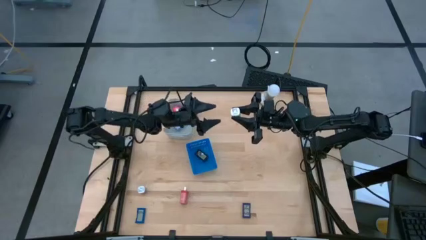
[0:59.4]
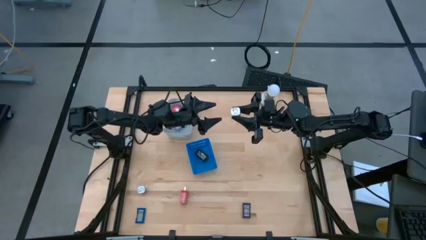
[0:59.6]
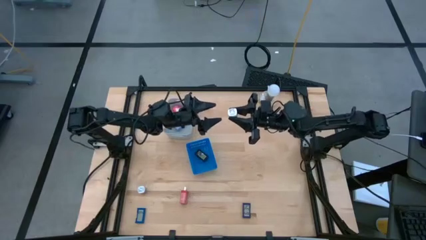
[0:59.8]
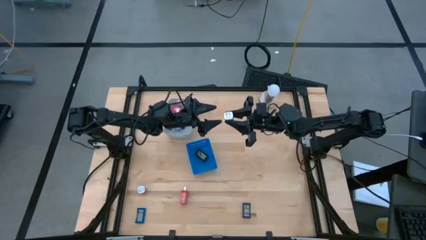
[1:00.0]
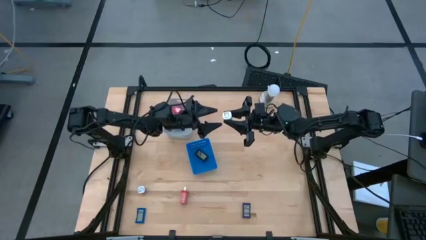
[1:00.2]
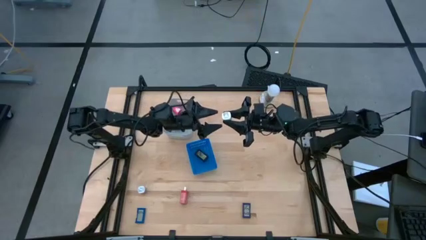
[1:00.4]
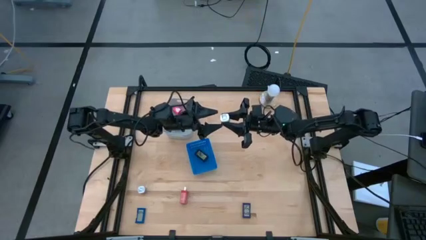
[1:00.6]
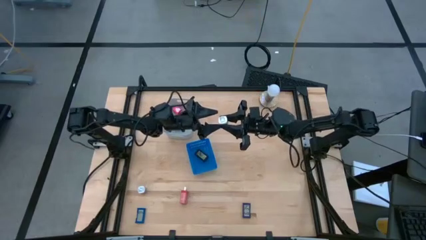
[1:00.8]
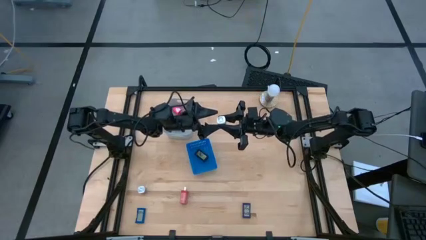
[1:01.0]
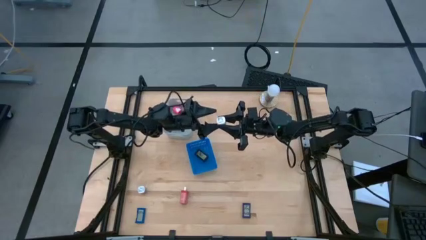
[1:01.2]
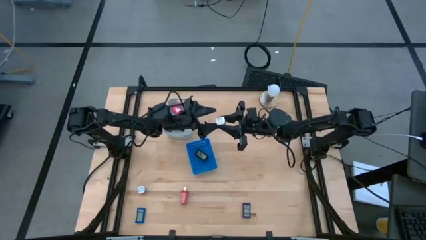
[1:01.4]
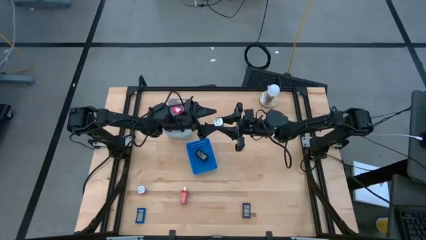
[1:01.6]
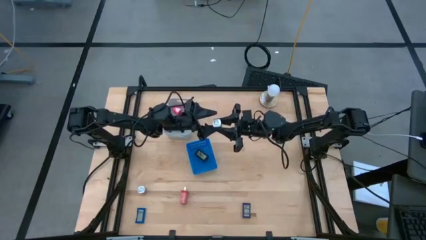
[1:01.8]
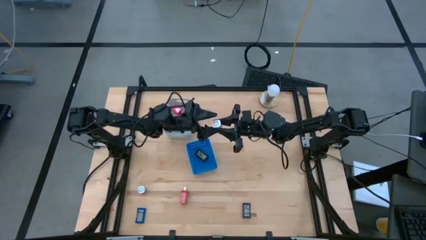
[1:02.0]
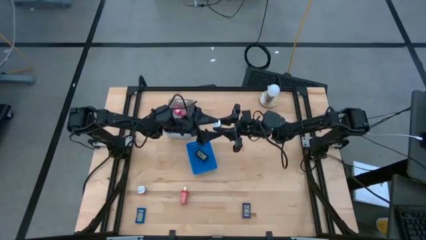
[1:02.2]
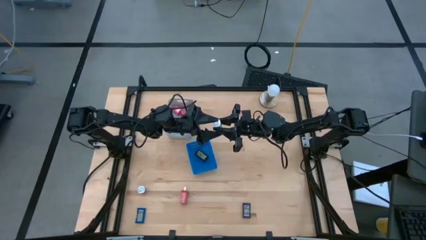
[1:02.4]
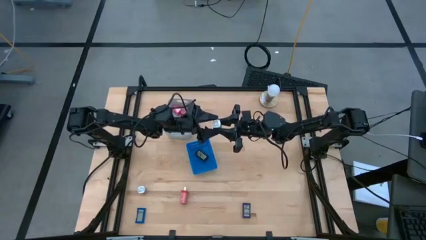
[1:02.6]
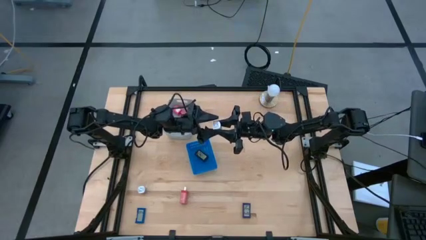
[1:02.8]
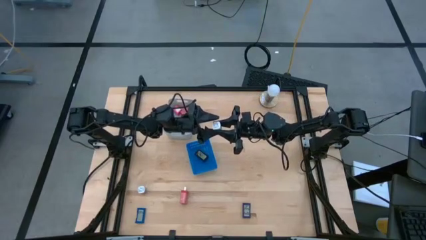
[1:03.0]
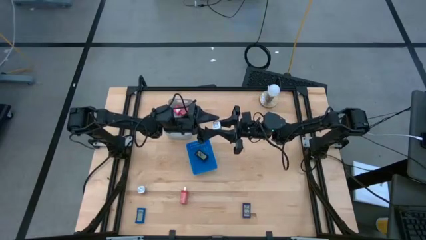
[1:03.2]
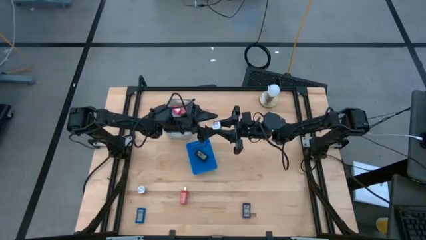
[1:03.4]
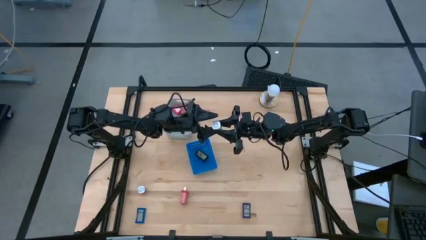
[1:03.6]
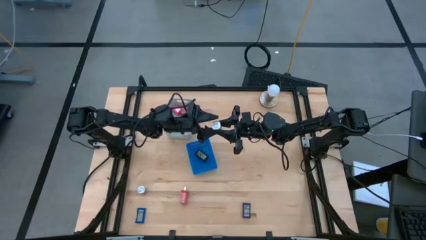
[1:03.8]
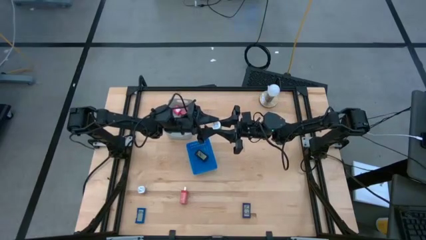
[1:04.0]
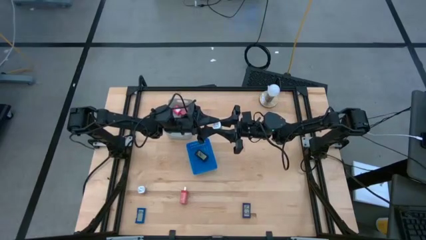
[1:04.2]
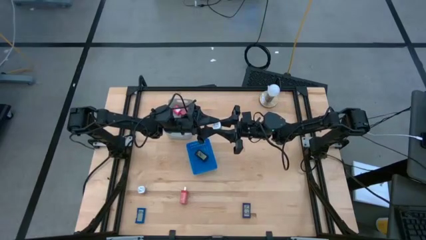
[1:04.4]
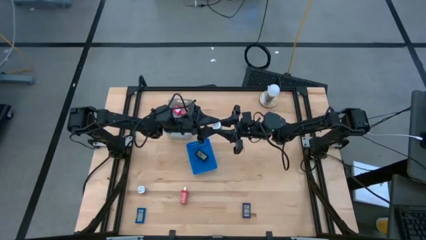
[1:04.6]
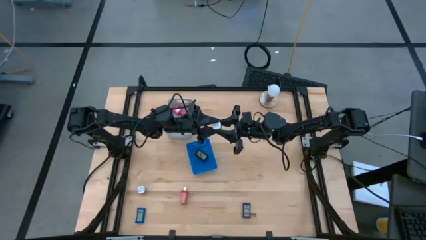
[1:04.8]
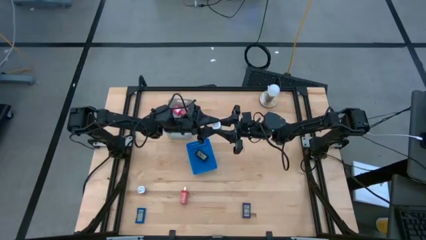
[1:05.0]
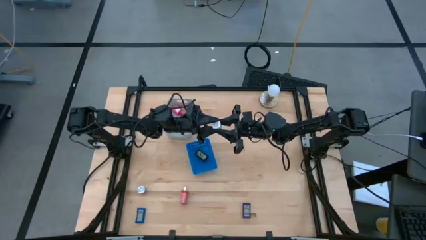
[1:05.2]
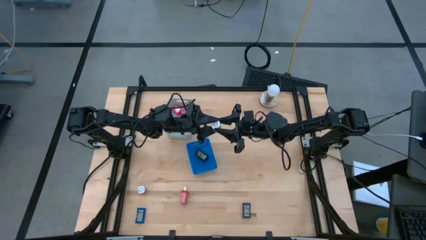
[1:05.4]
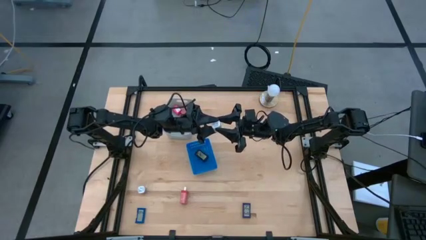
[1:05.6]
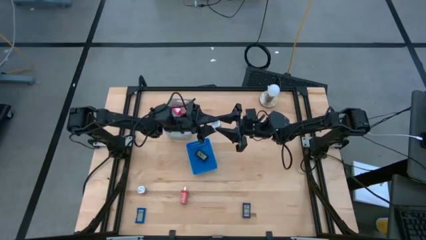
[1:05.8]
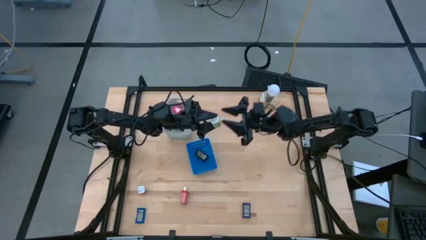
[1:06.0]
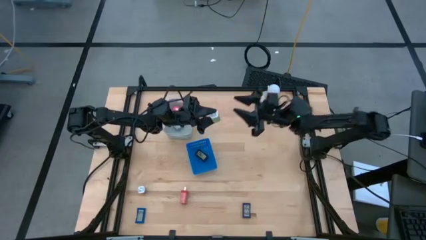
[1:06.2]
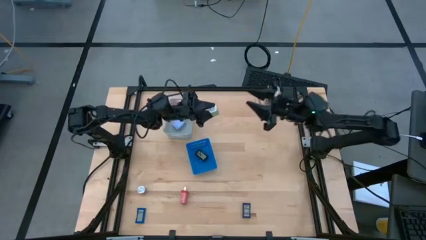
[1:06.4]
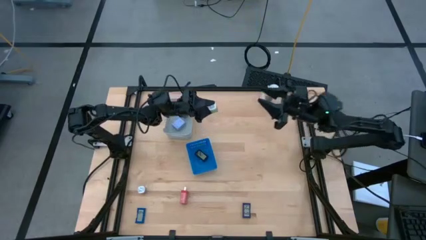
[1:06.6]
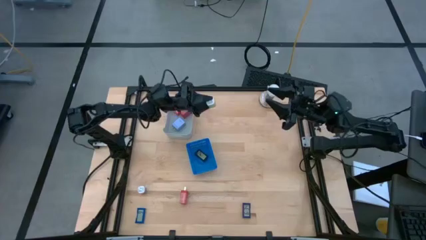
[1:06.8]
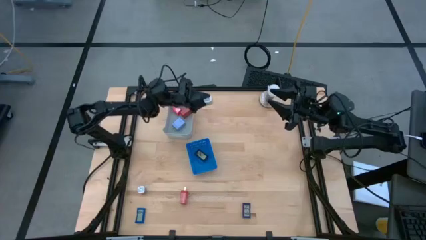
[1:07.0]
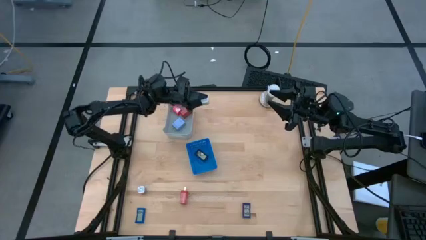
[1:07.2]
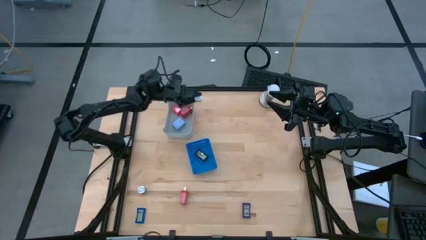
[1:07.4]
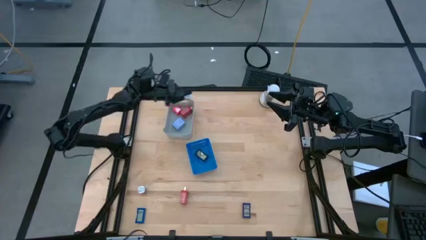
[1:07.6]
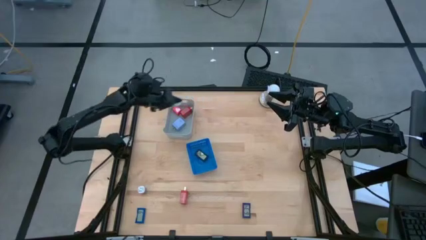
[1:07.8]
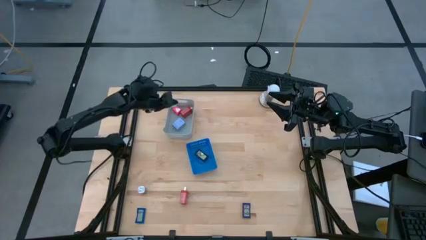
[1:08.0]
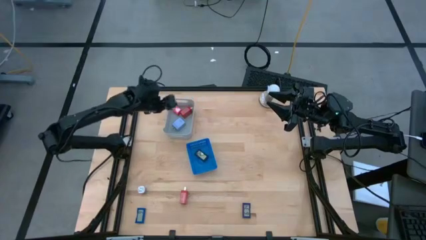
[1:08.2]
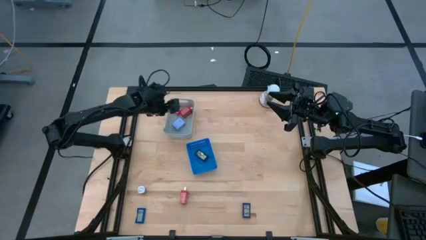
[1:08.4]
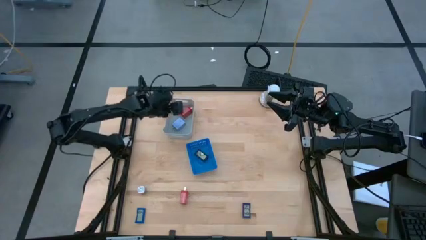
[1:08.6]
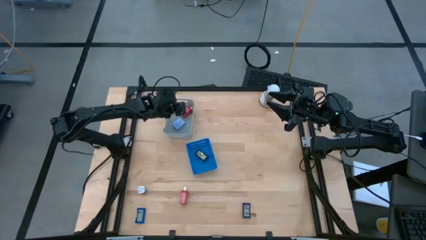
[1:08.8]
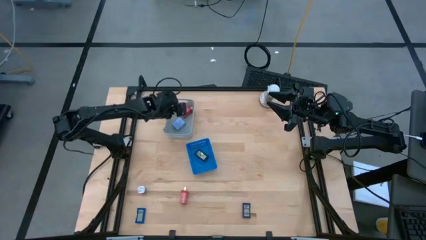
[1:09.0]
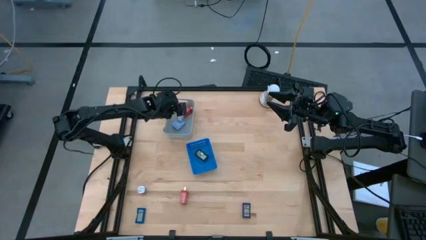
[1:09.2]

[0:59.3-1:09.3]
Task: Pick & Place Office items
Put the green charger adapter into the gray bin

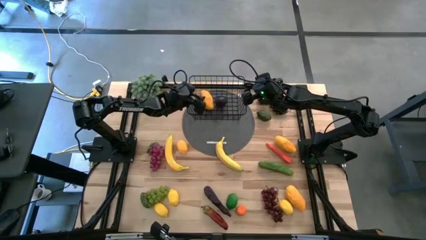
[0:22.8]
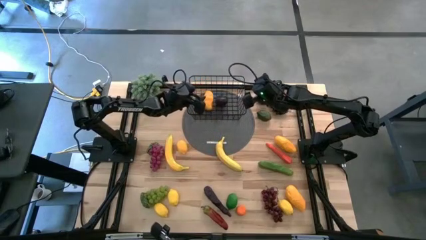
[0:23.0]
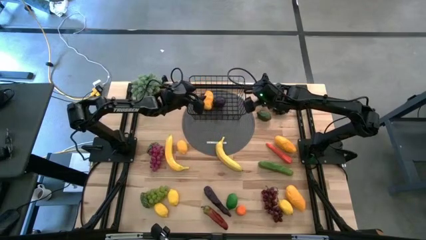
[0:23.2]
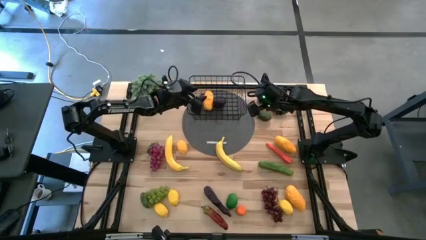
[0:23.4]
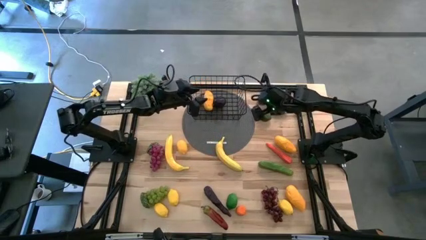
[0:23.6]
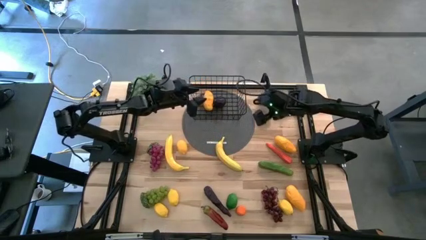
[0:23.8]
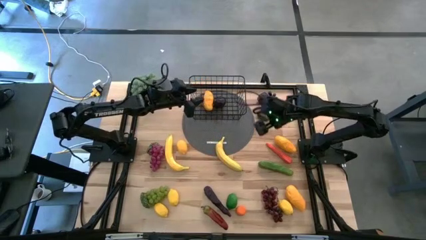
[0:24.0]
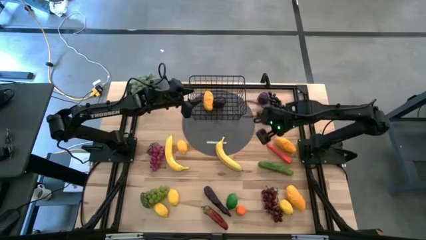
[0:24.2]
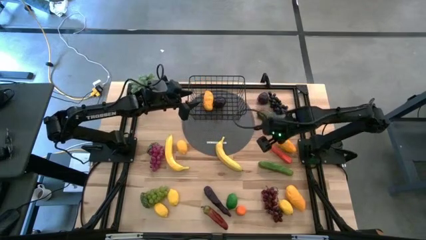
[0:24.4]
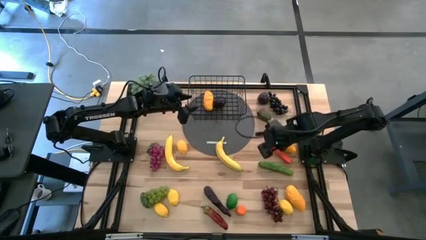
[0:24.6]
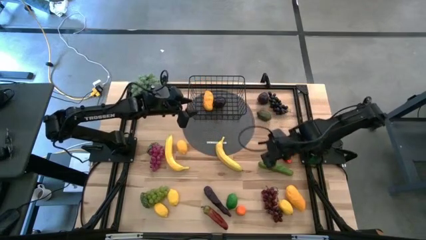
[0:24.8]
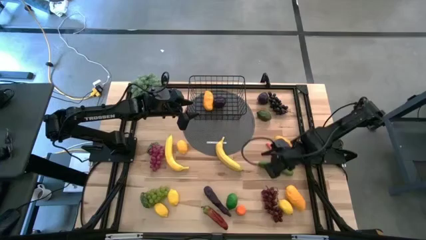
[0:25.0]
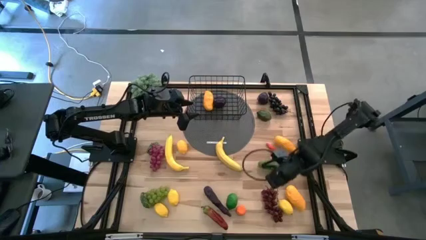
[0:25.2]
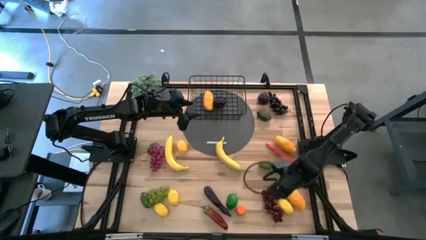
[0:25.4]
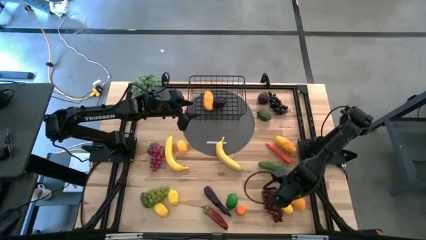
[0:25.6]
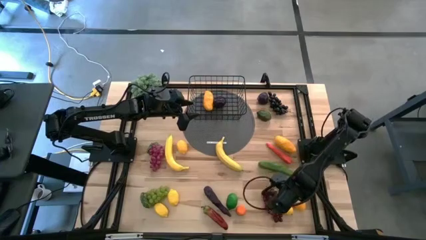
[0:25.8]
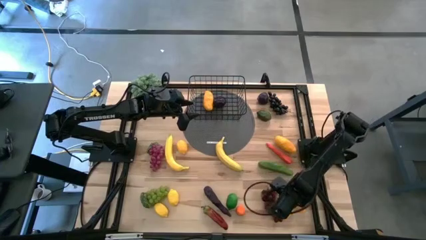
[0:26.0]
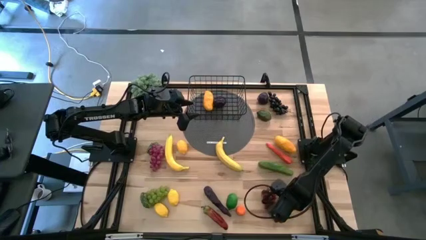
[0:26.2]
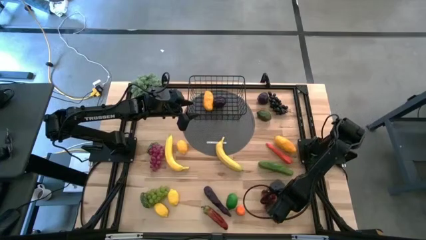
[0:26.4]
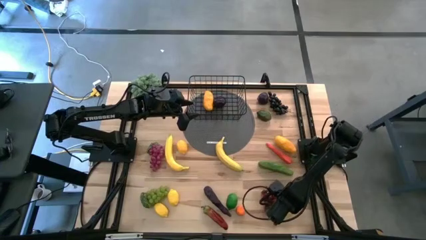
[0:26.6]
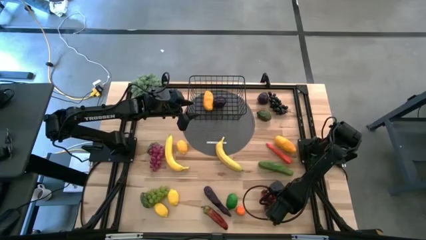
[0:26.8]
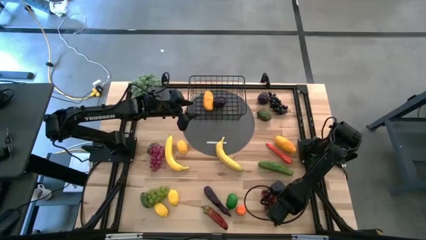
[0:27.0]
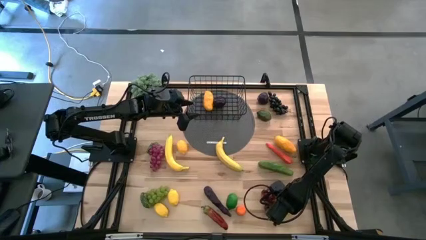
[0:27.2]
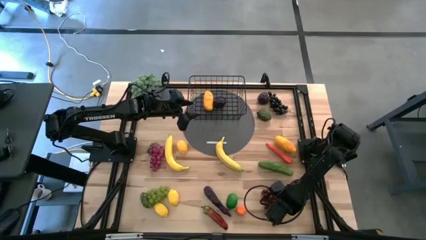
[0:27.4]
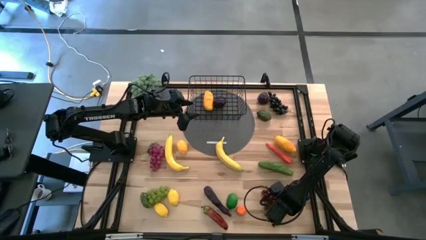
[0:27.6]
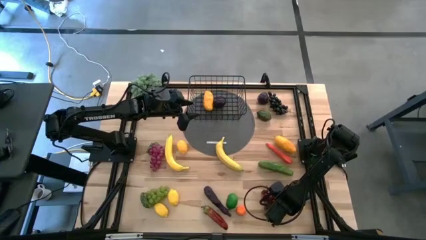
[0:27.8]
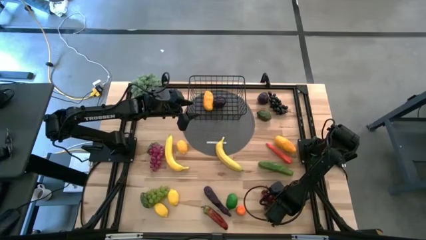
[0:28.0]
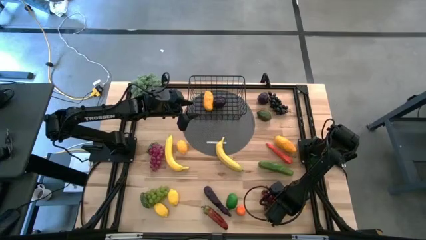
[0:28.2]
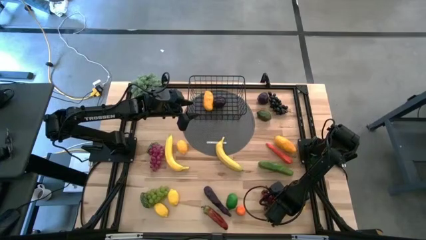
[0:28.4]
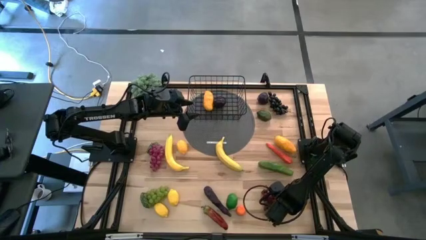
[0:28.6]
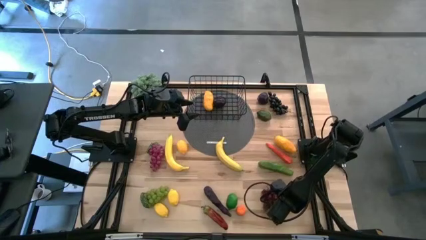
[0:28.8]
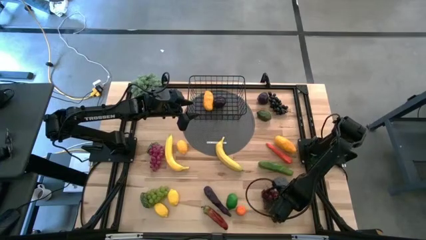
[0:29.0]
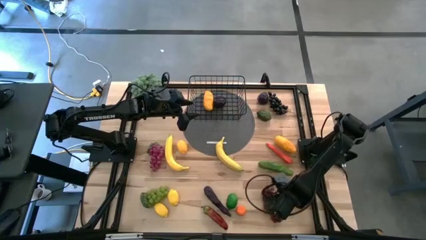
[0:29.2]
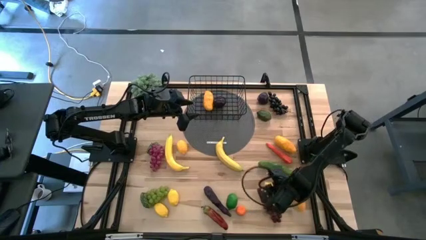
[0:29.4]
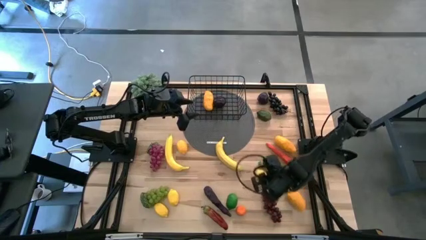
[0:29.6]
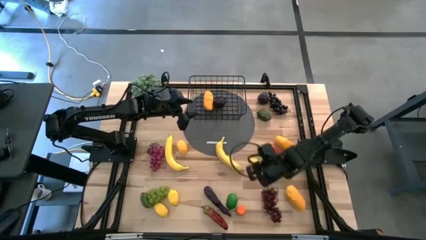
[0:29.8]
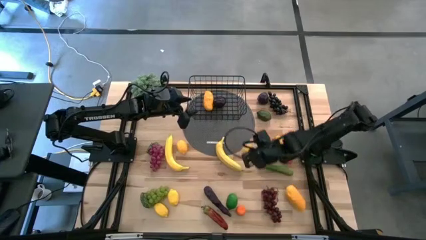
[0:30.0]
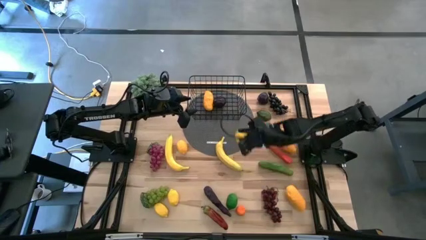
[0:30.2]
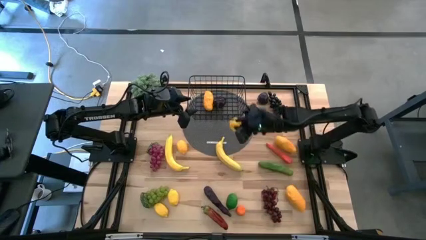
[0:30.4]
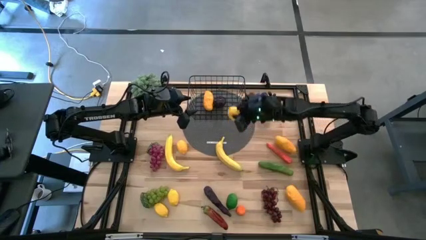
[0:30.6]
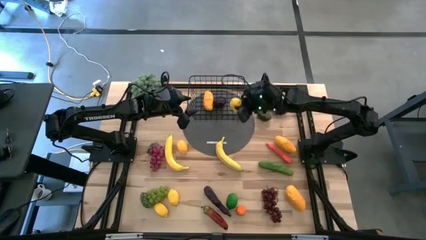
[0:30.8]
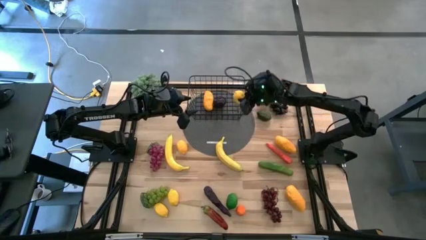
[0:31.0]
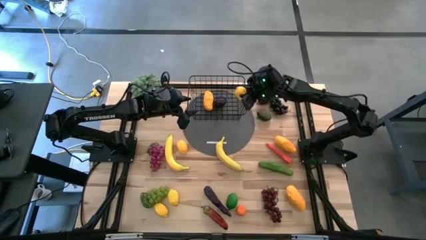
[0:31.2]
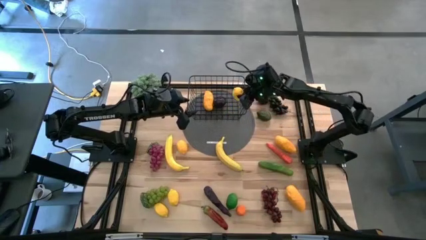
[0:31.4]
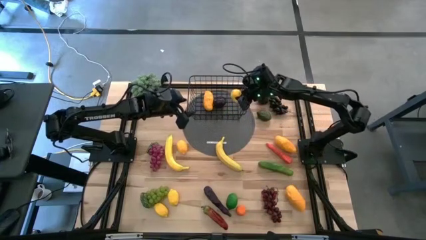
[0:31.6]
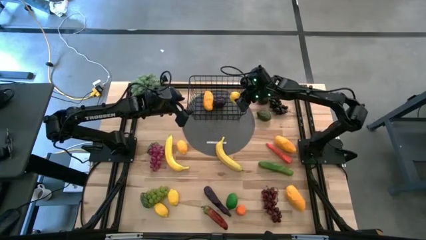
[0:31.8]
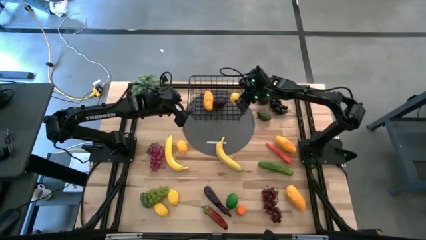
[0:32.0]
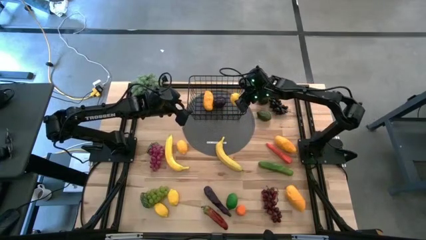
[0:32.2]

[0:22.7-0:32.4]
Task: Build produce basket
Put the yellow lemon into the black wire basket
